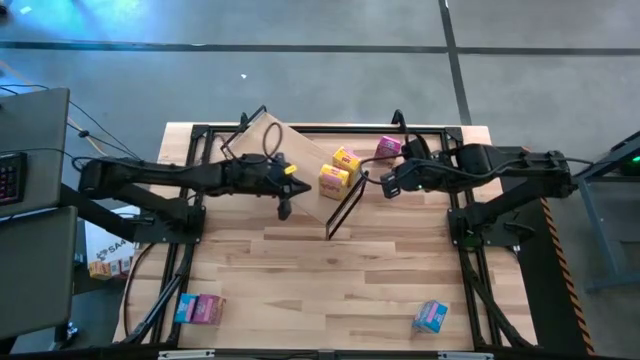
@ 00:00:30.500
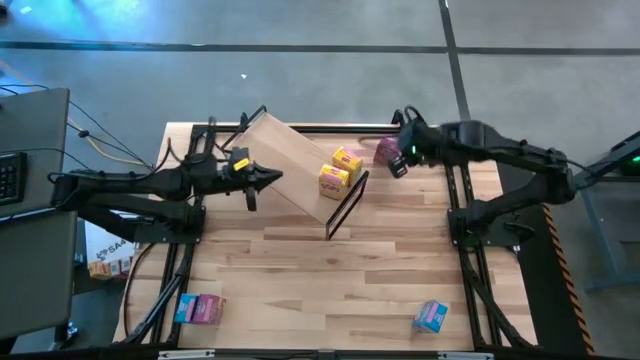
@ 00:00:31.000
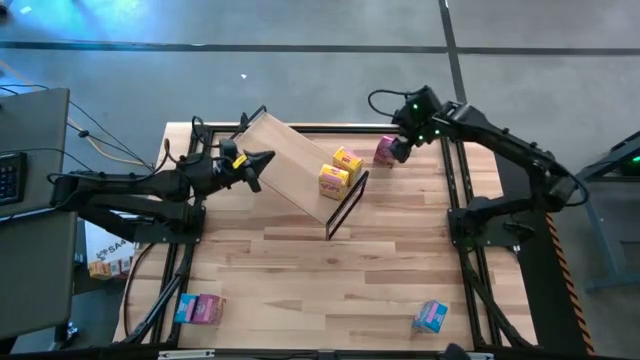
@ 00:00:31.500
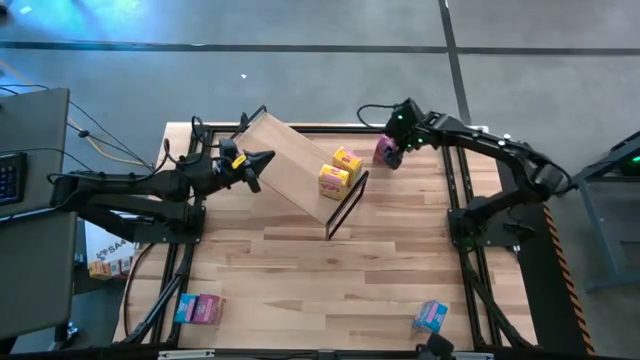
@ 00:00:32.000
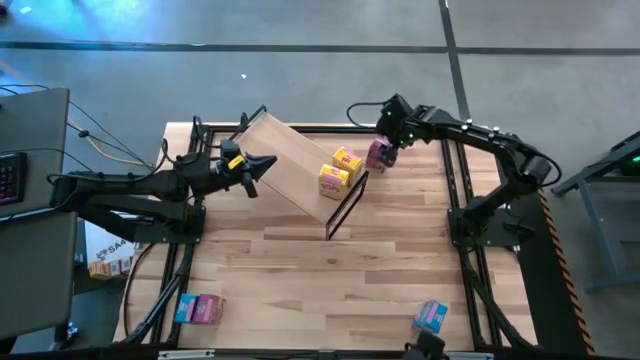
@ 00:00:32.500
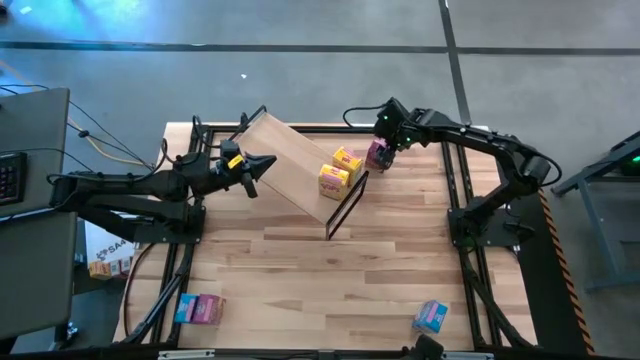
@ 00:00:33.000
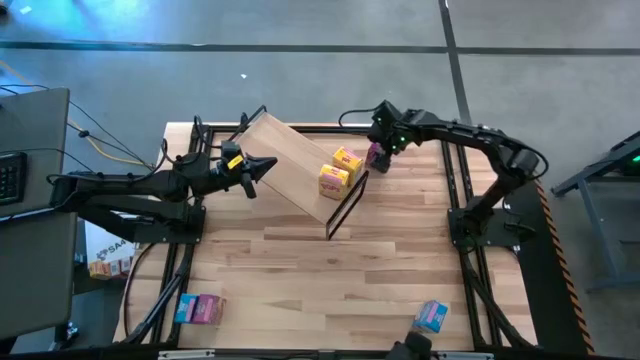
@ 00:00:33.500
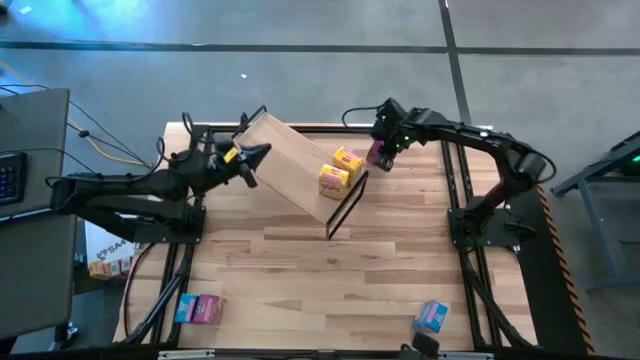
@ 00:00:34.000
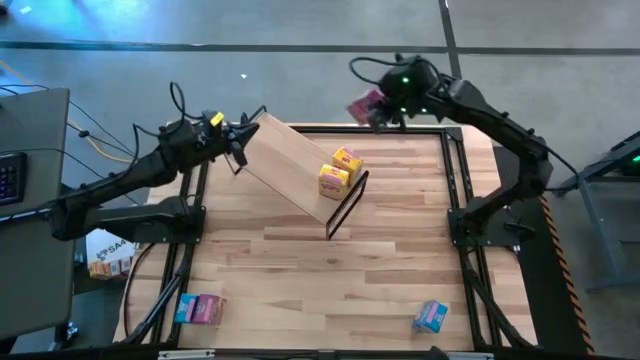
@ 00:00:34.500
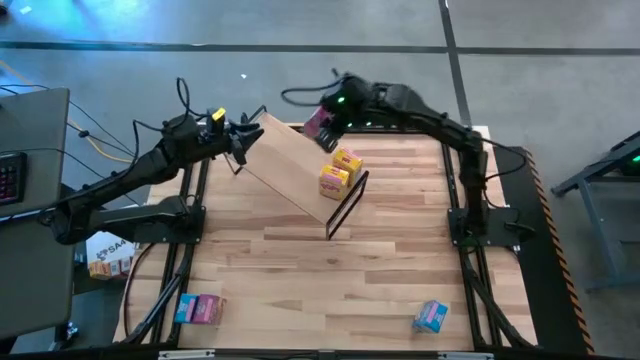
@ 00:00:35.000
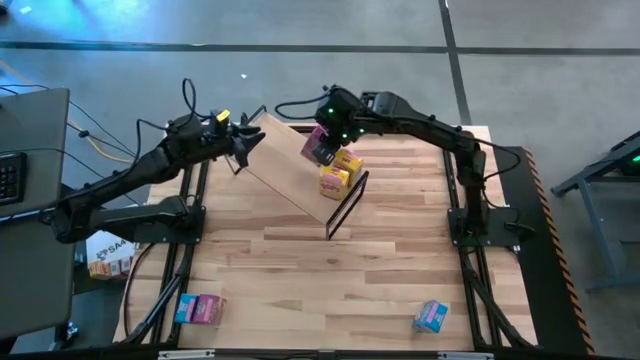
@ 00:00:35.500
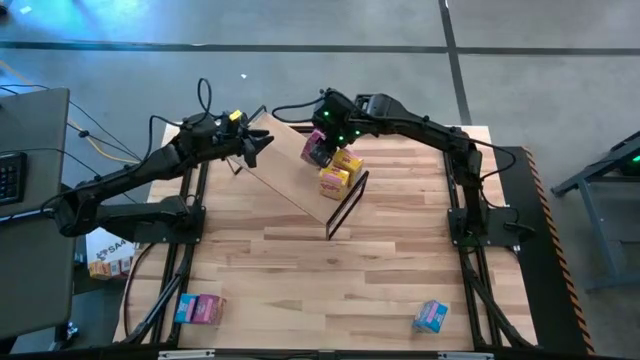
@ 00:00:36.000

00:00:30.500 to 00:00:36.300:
Task: Stack cereal on shelf
Put the purple cereal box on the shelf

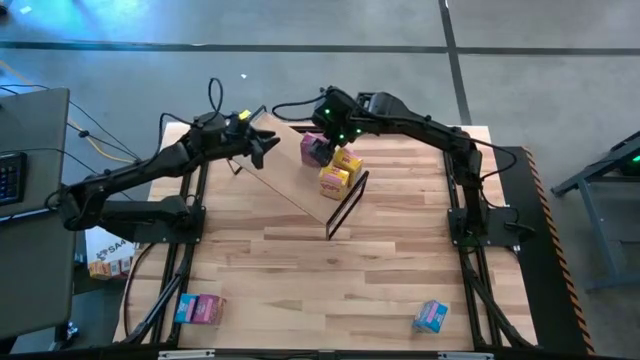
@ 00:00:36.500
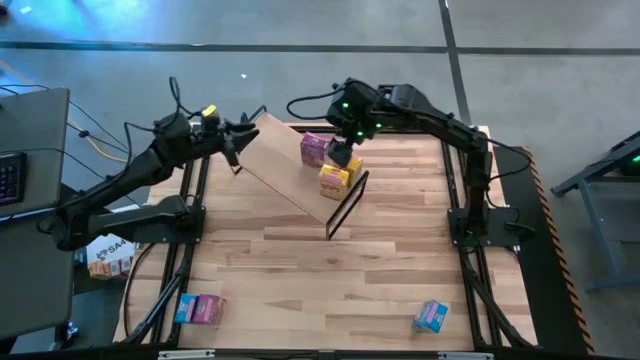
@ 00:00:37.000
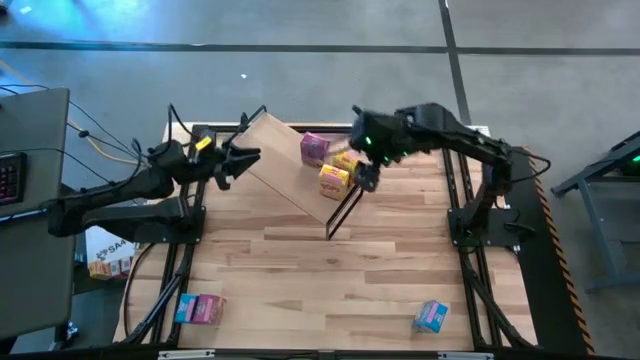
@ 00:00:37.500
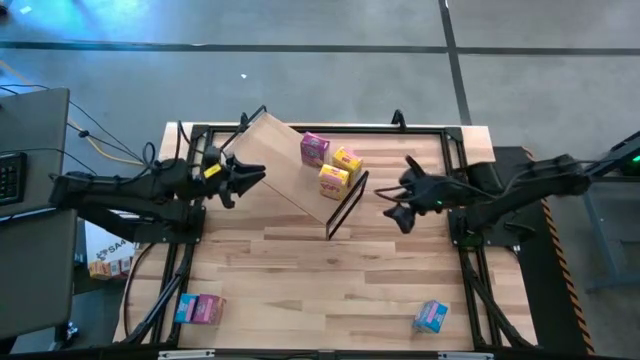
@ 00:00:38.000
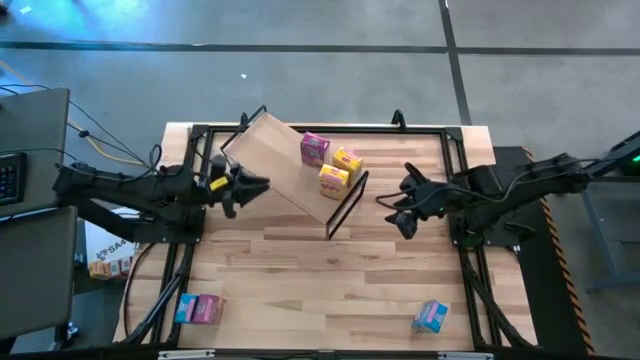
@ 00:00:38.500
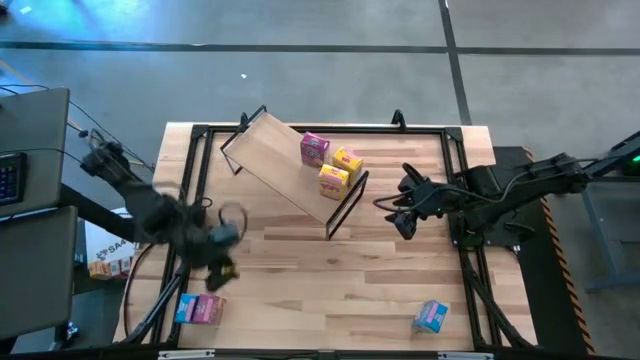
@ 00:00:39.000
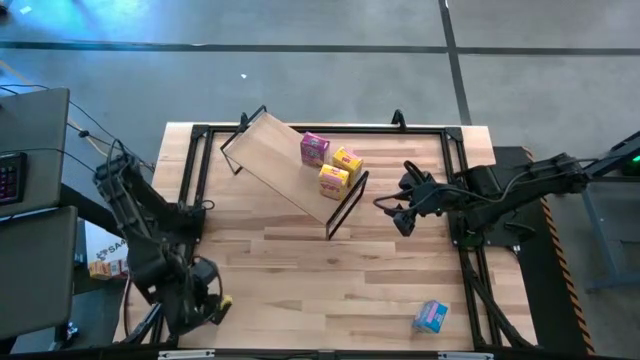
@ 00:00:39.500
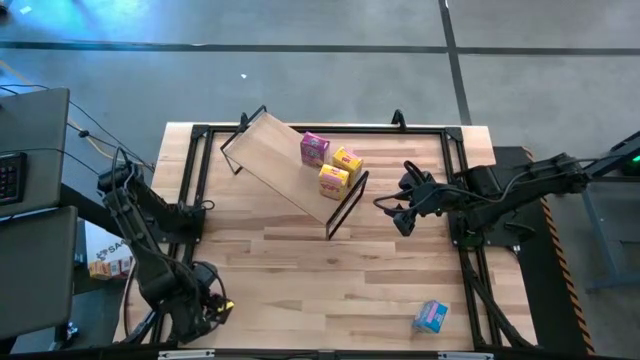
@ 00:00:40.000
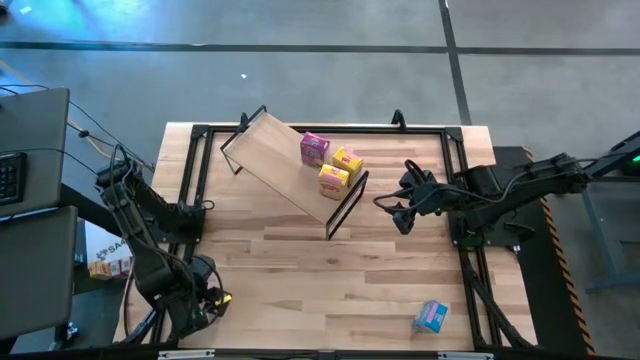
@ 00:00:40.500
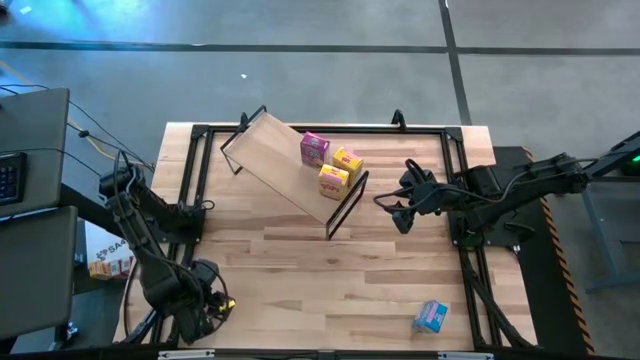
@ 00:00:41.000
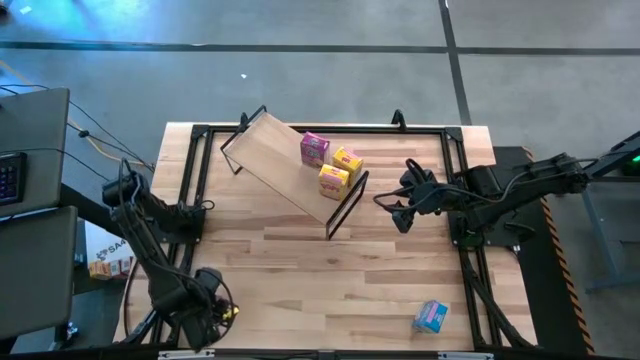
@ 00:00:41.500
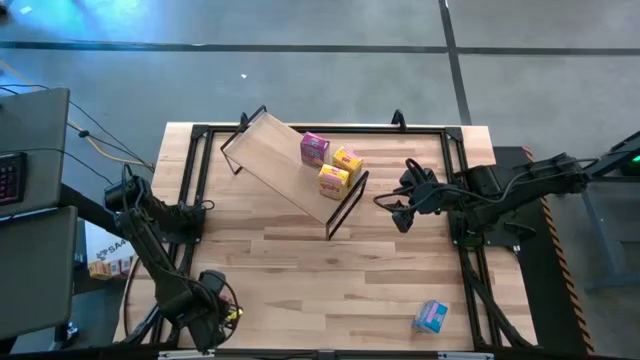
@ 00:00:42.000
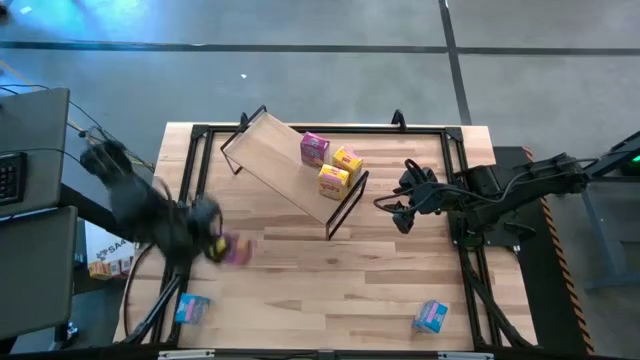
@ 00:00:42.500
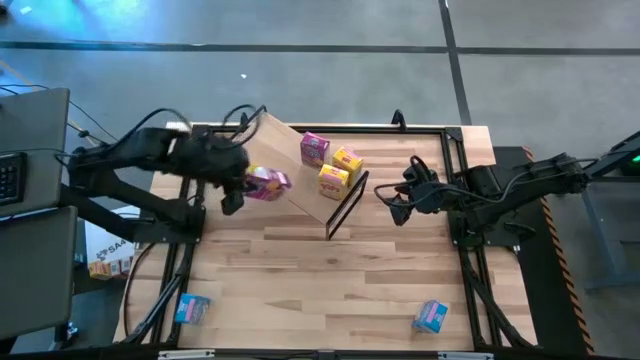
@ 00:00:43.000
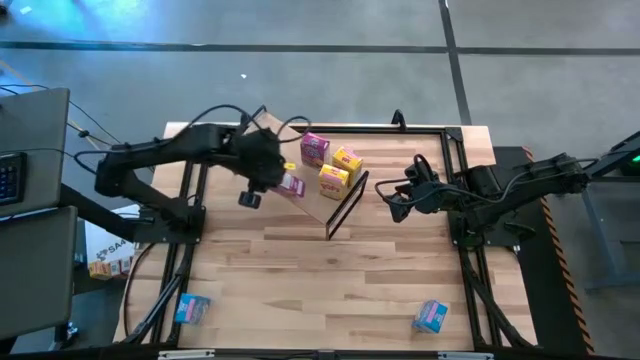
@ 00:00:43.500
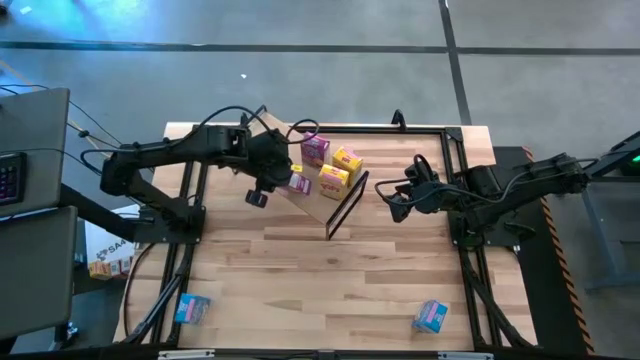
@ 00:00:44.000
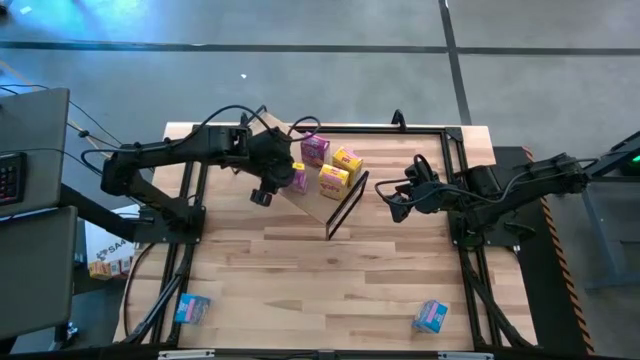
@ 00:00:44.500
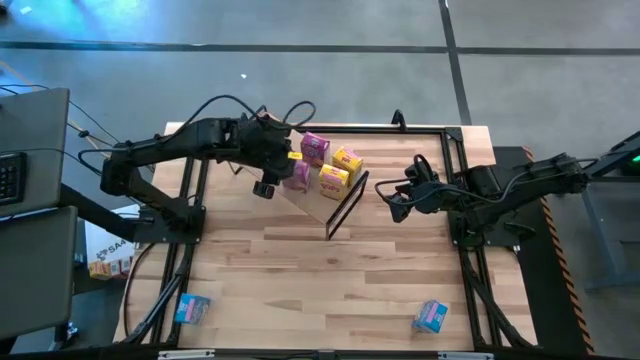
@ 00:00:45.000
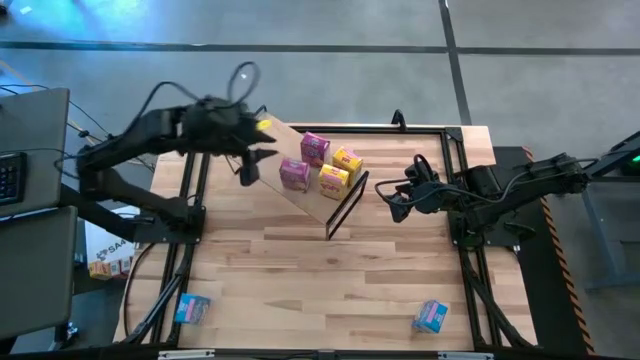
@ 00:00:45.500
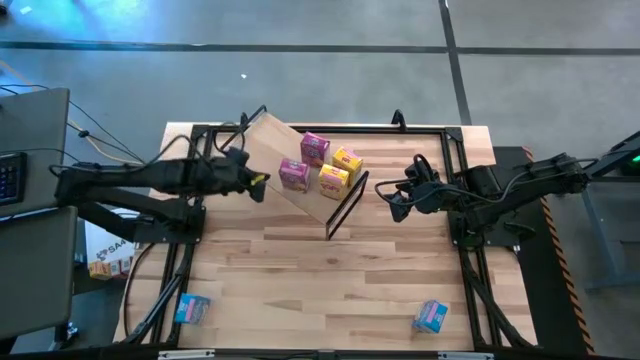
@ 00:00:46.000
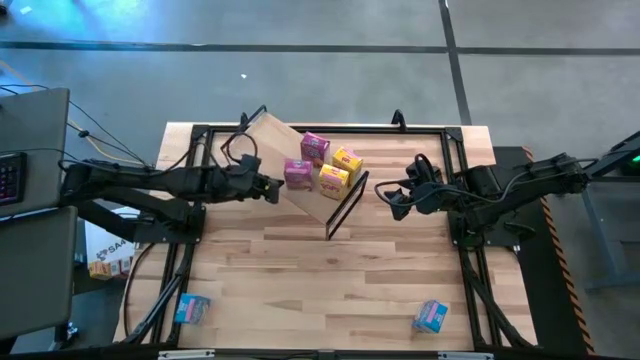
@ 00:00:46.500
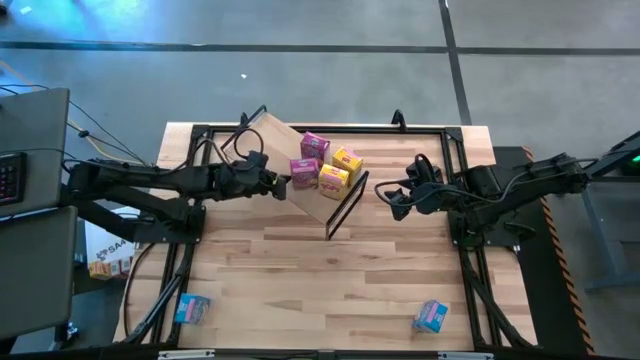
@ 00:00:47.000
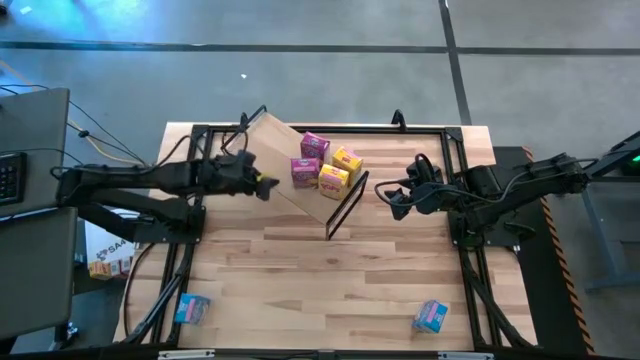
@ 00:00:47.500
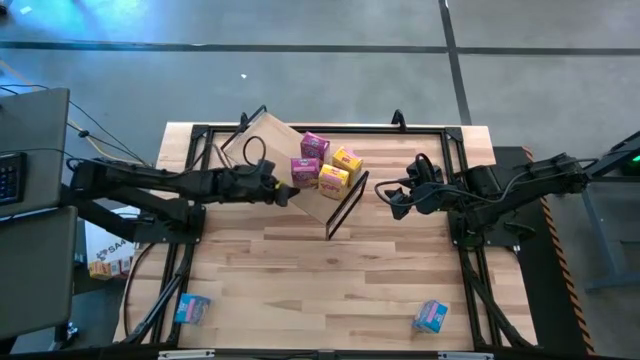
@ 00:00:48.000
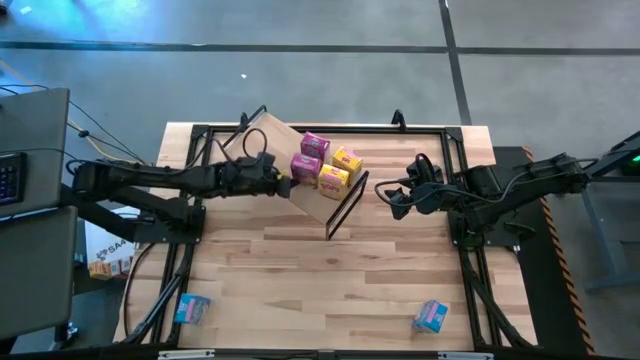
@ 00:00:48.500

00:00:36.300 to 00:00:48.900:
Put the purple cereal box on the shelf aligned with the other purple cereal box

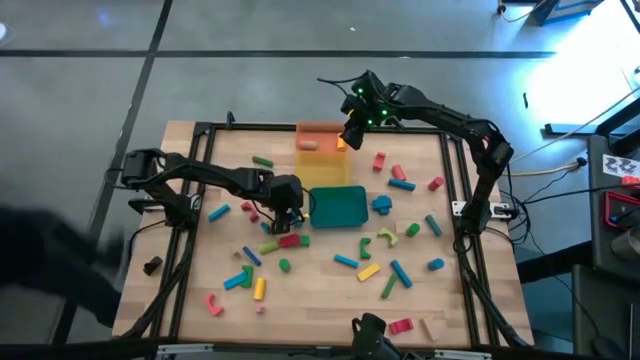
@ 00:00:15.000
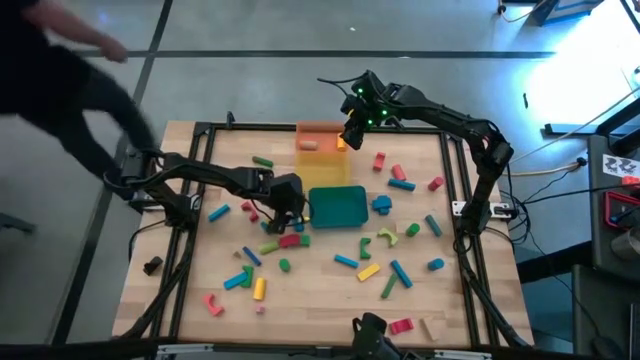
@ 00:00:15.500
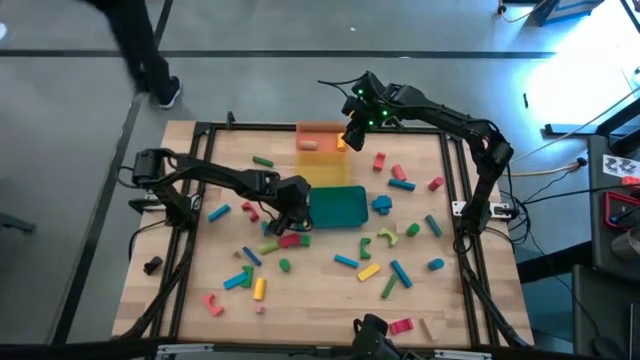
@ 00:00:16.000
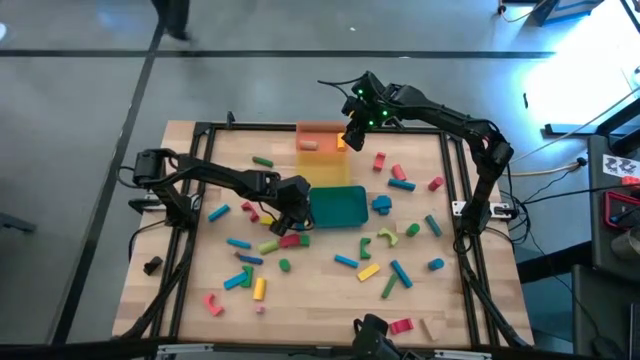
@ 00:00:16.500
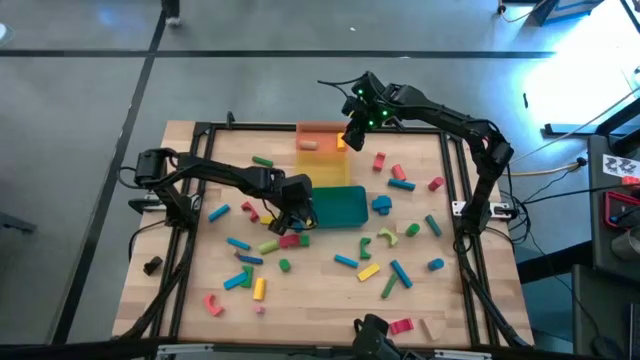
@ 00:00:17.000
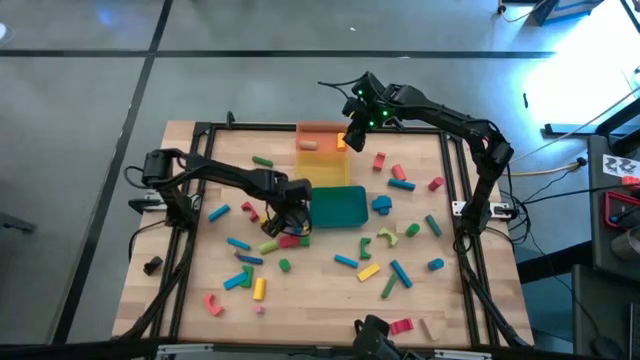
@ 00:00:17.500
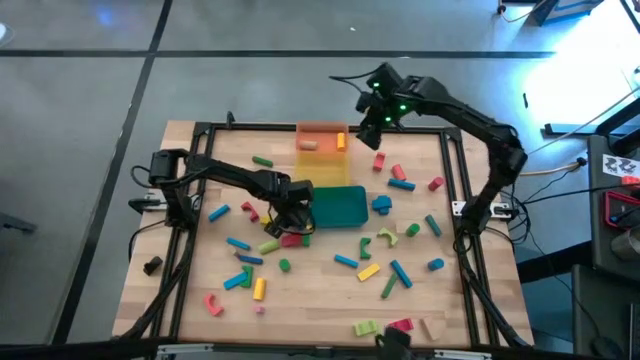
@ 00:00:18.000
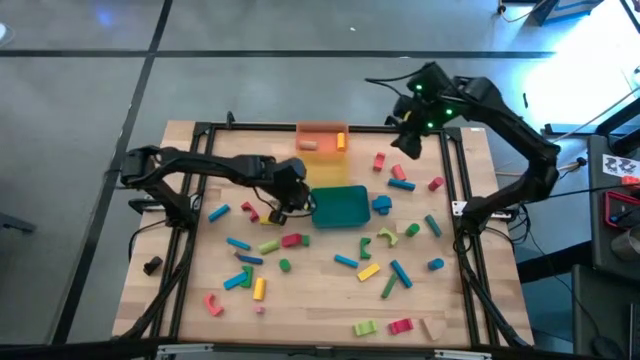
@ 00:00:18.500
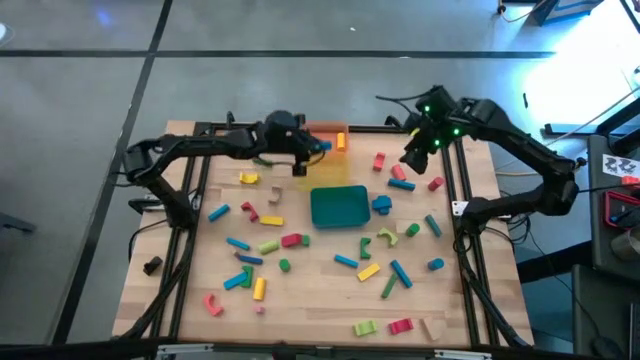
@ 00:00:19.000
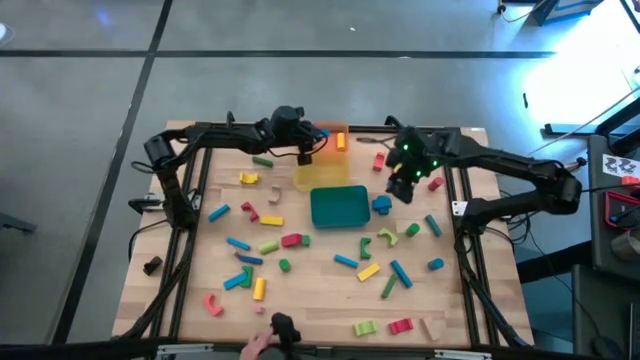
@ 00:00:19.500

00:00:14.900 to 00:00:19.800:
Task: Sort blocks by size
Put the blue cylinder block into the orange bin
